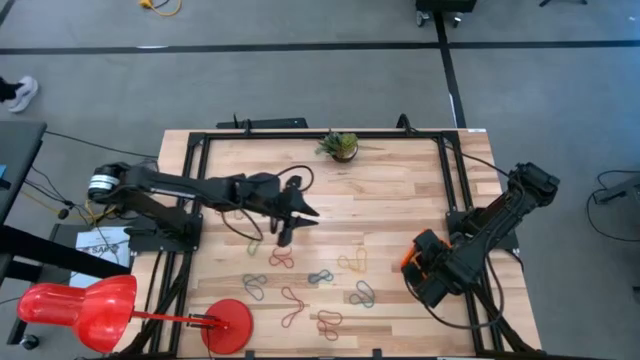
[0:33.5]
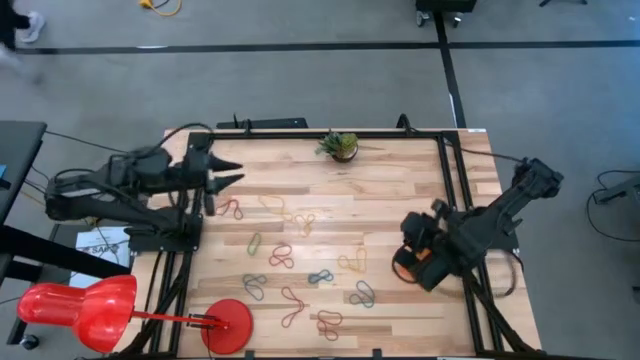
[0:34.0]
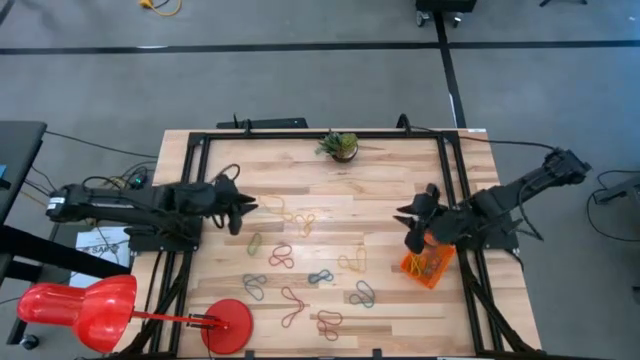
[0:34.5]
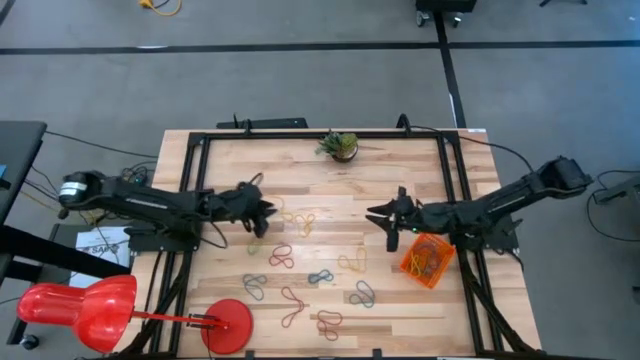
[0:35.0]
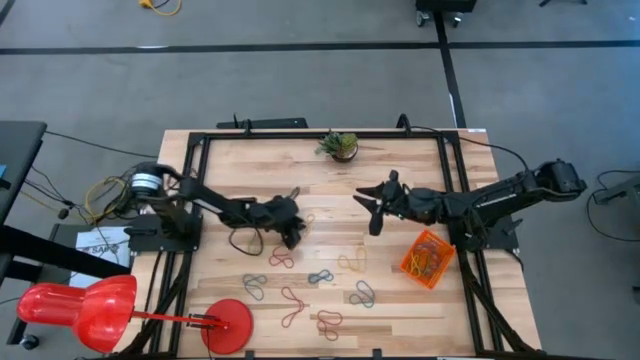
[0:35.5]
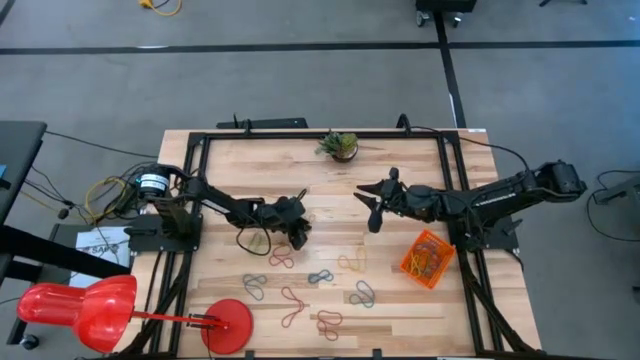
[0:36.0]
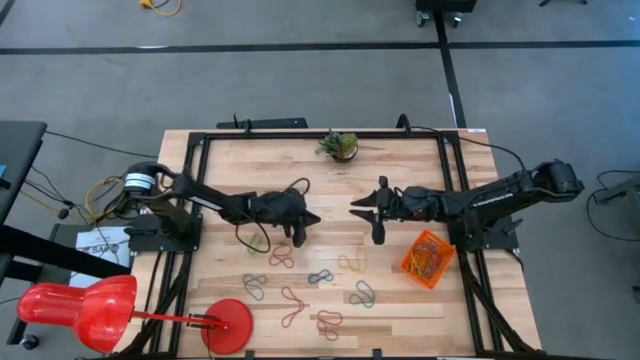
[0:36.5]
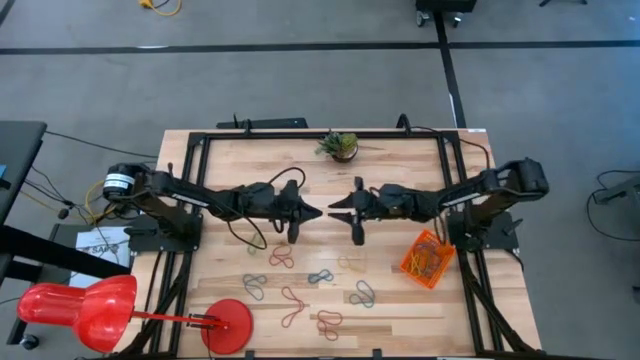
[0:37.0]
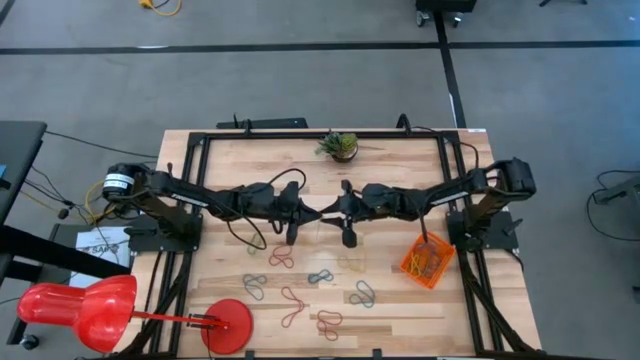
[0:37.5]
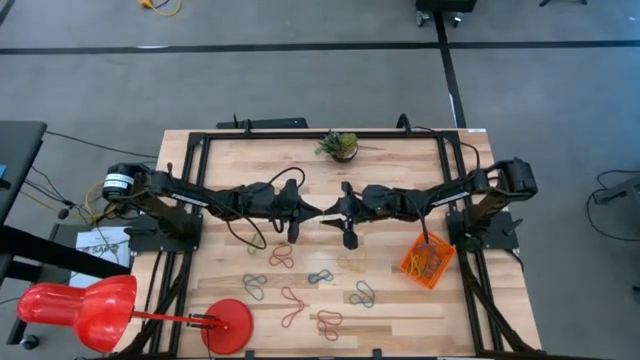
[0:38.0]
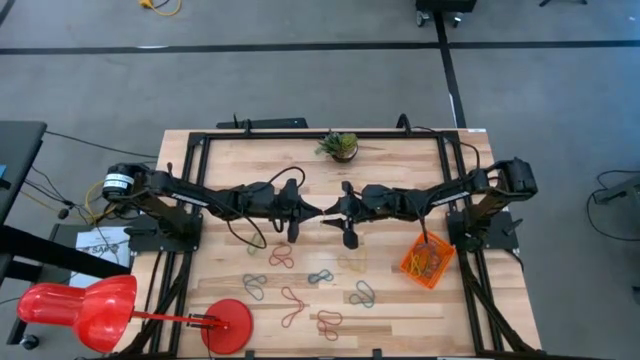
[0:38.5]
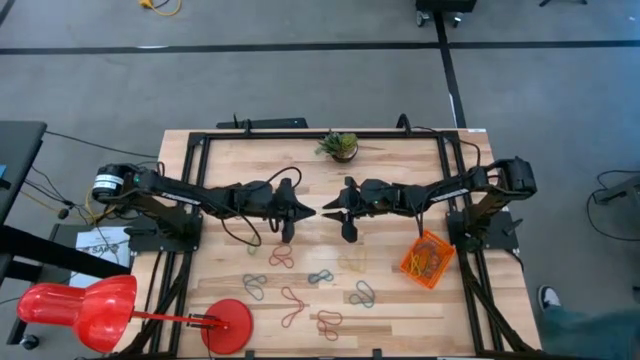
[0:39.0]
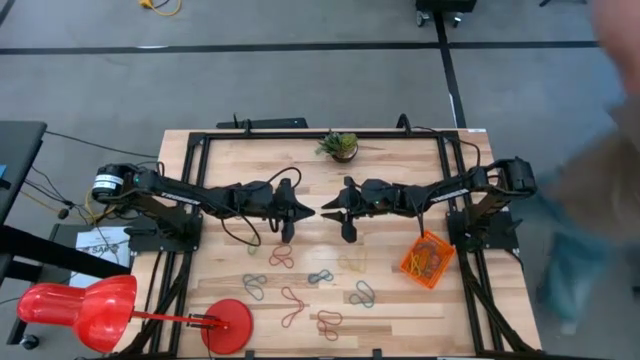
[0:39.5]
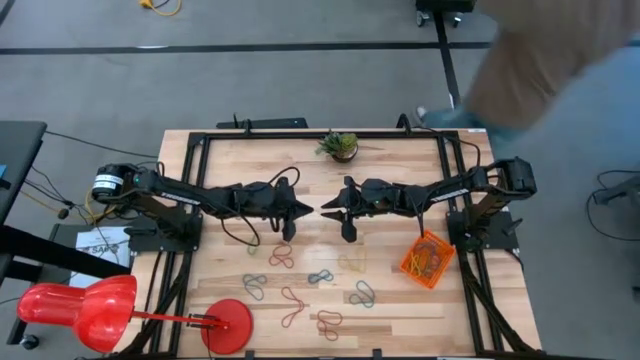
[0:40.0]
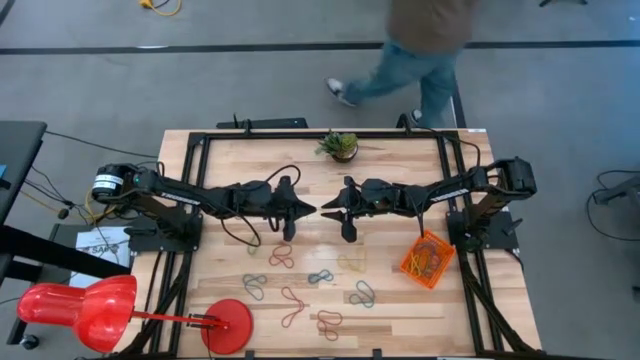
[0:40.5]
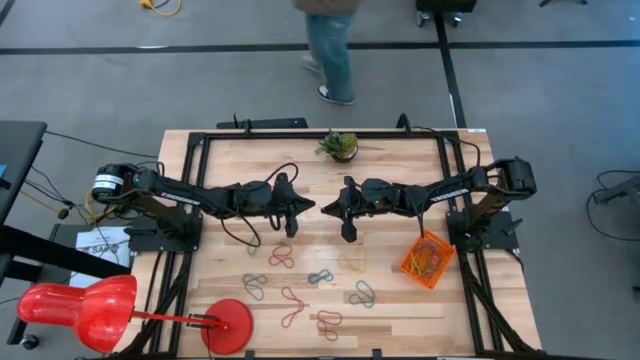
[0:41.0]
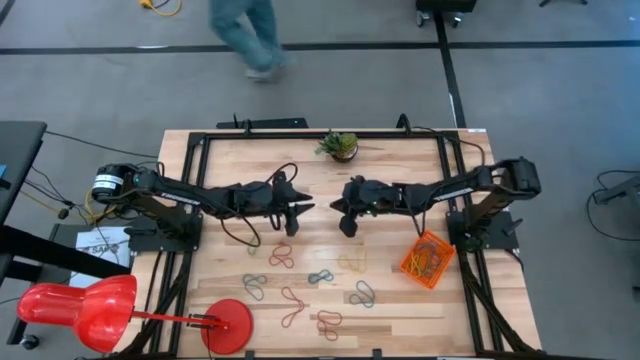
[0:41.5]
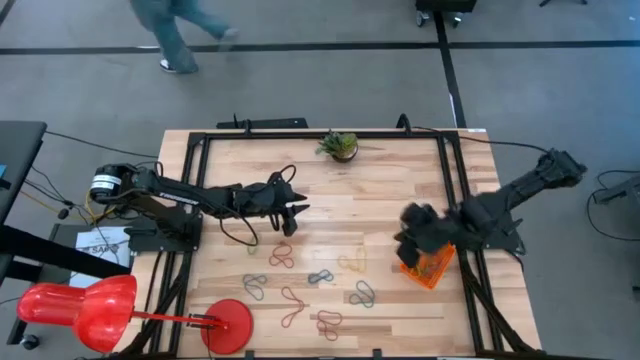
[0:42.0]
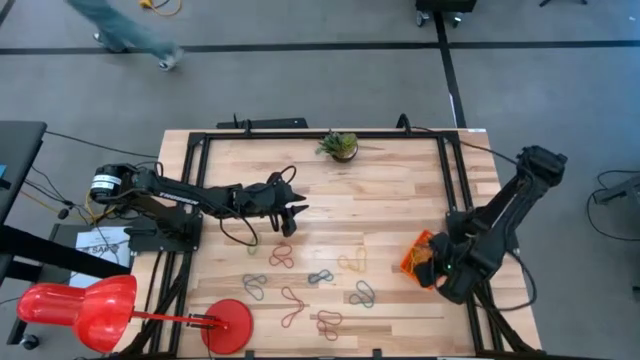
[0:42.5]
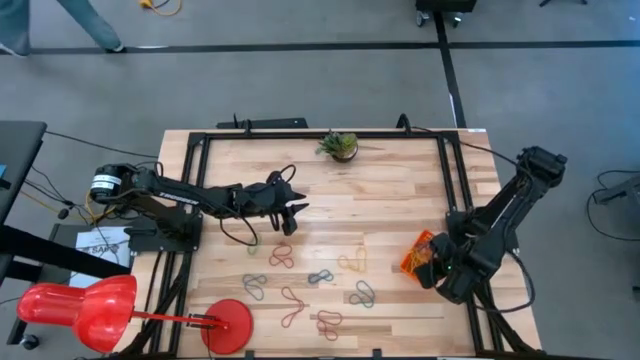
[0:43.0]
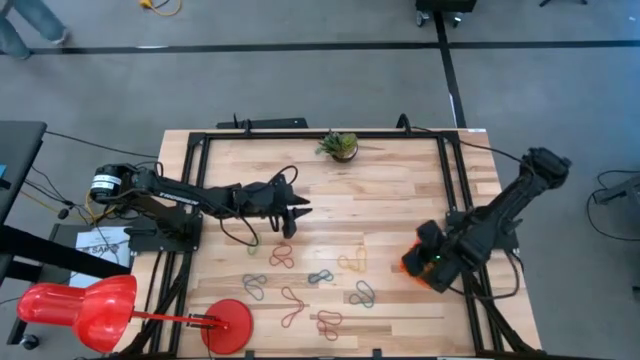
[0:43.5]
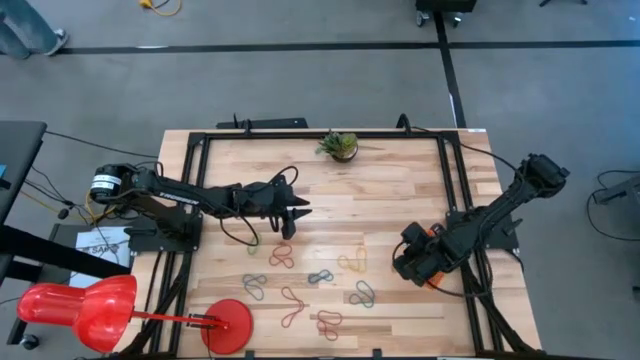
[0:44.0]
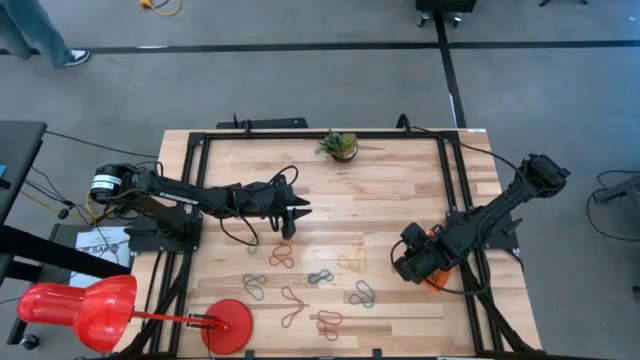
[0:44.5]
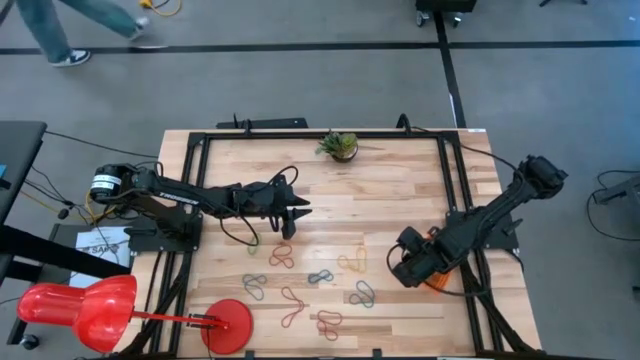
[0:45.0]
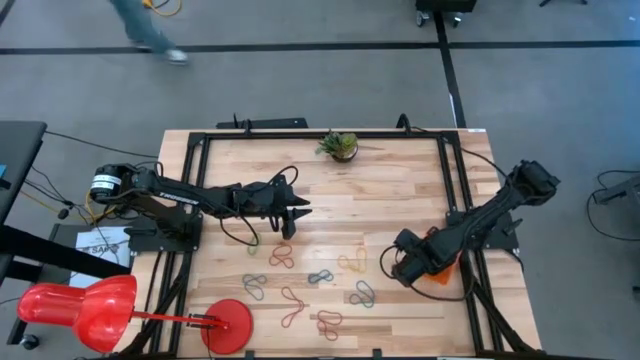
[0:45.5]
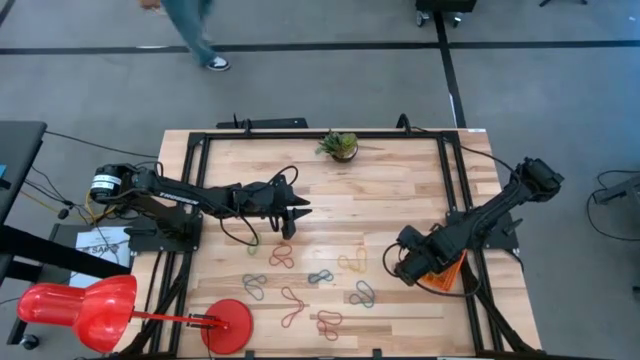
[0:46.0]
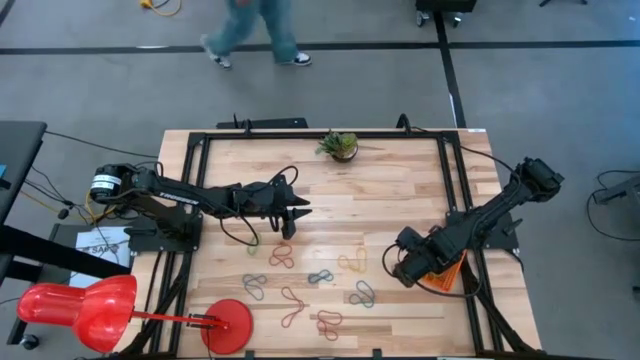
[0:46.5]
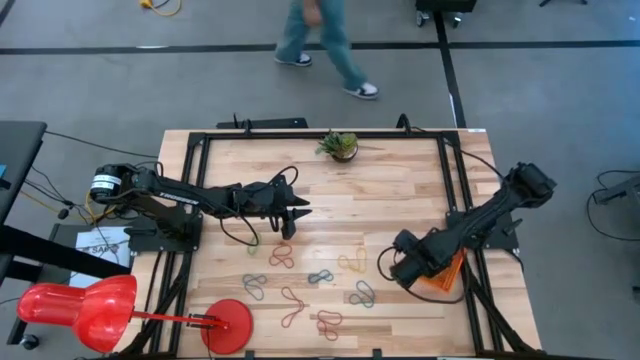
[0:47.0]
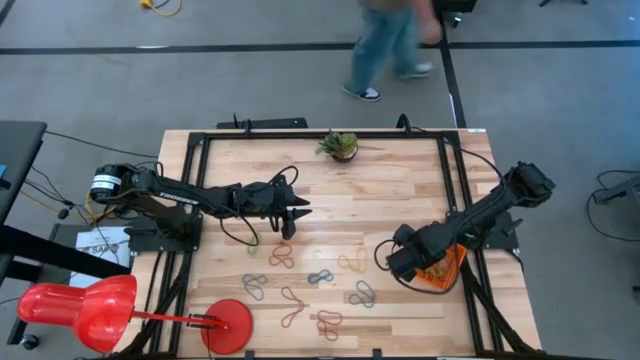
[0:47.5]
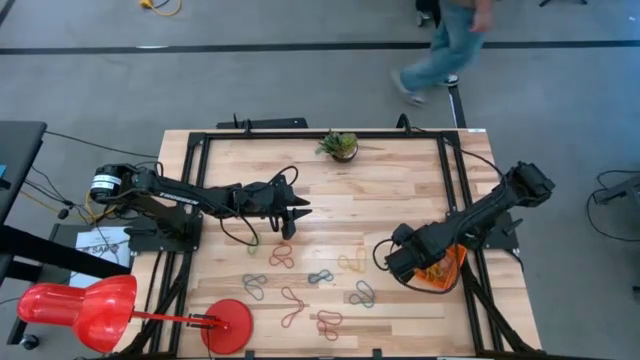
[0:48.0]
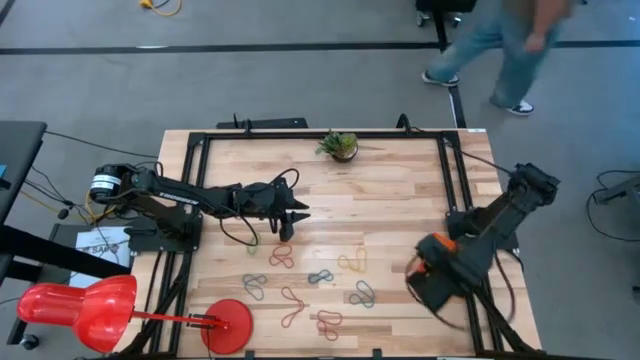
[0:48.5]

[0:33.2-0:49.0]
Task: Pick and place rubber bands into bin
Put the yellow rubber band into the orange basket

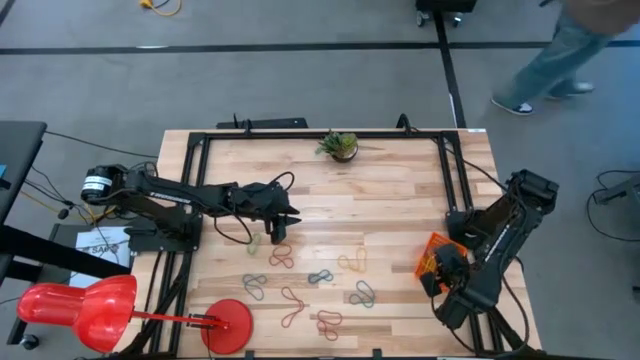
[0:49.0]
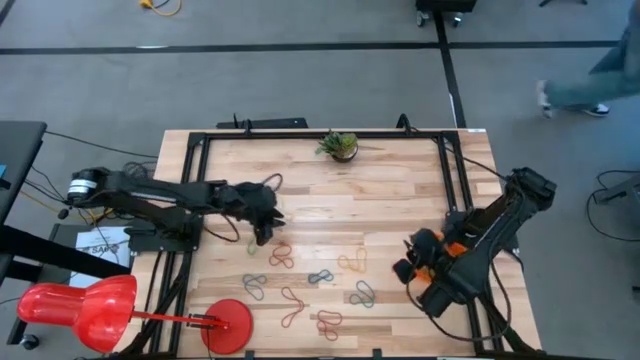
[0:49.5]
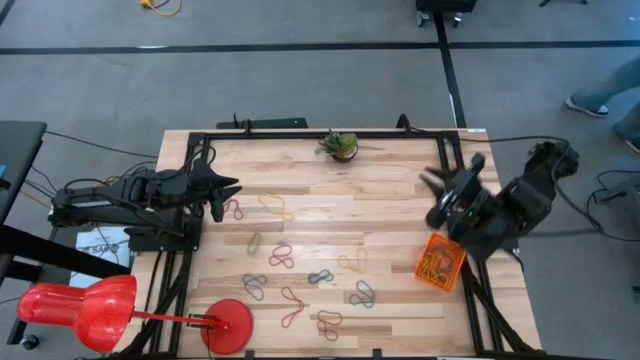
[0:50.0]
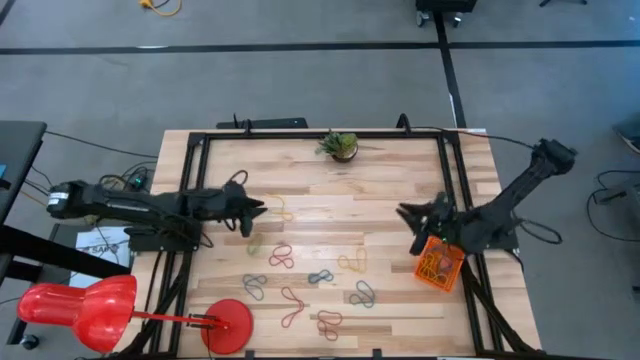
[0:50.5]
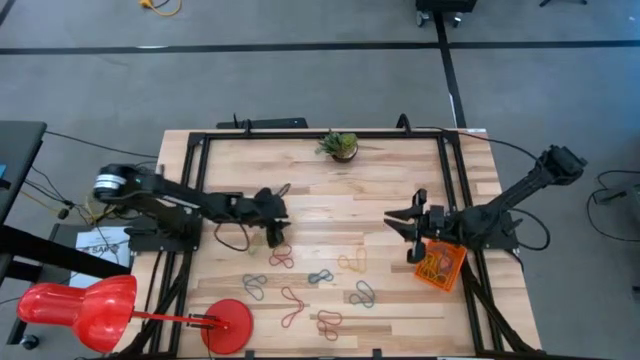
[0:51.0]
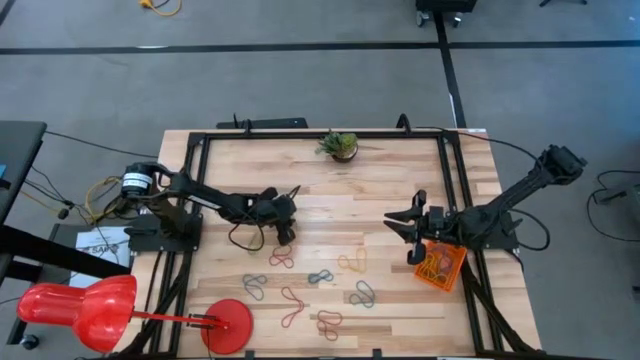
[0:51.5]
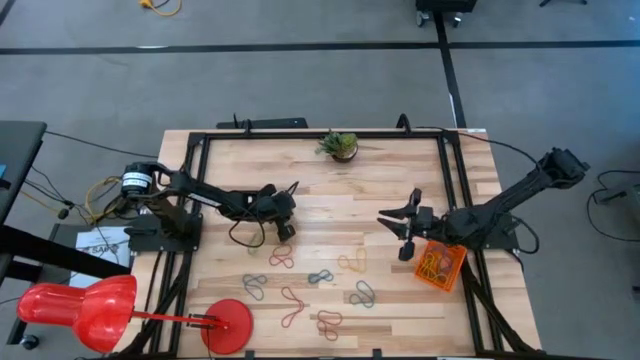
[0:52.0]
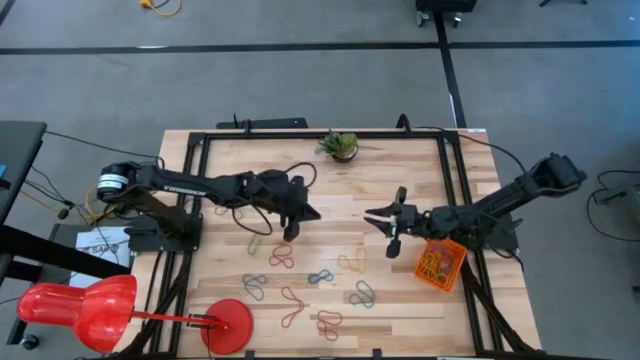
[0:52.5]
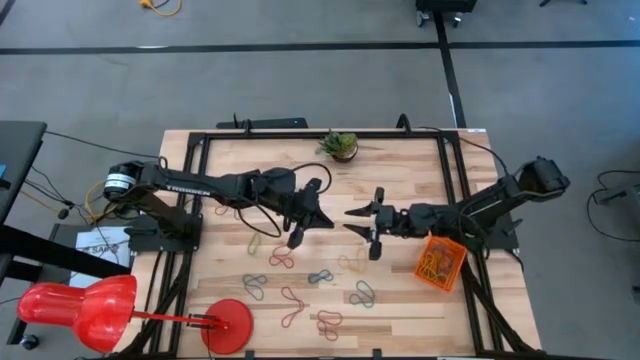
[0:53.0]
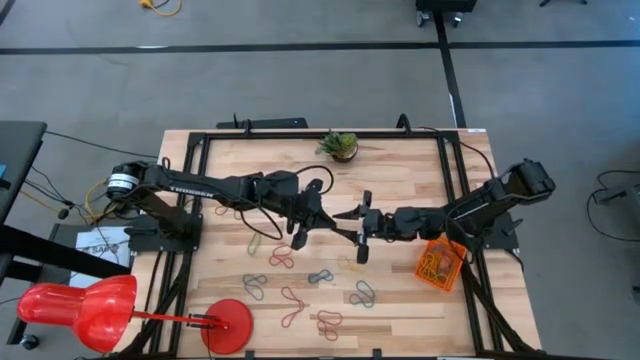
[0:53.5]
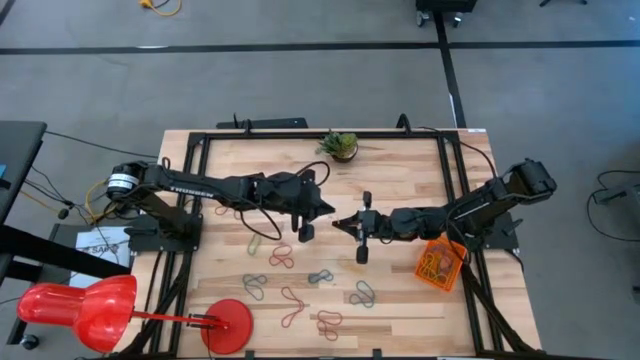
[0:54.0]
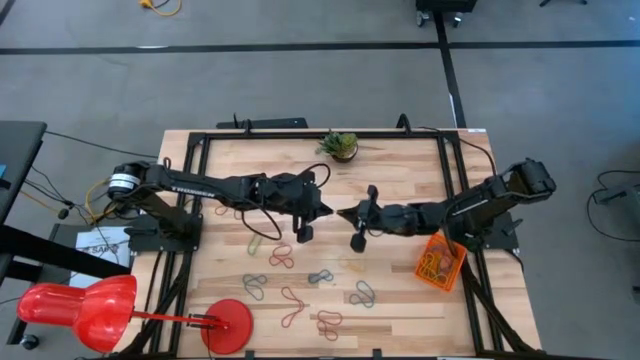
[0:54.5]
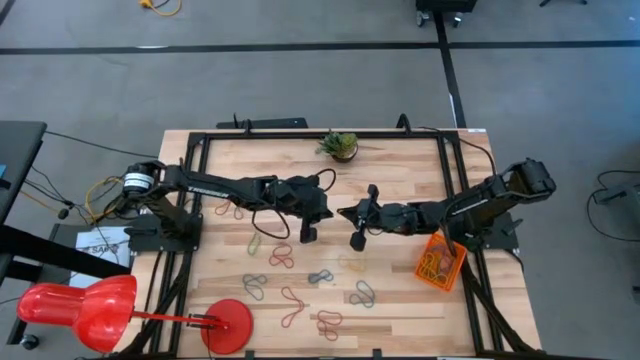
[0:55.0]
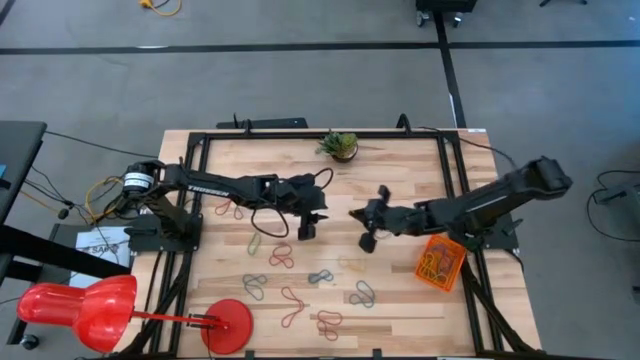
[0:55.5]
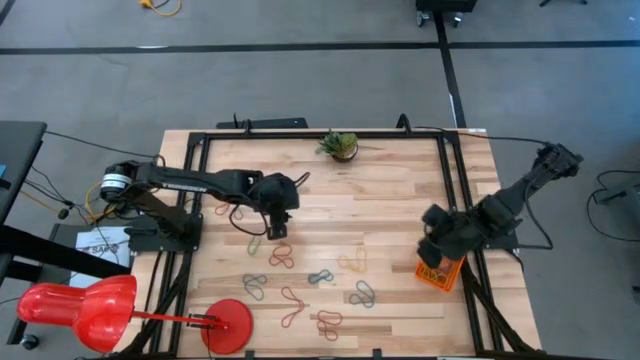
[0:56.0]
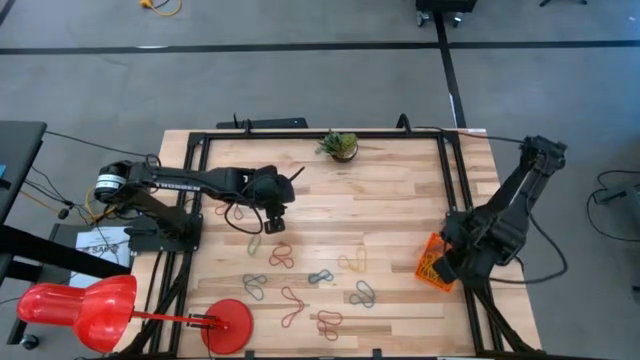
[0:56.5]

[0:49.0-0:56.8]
Put the yellow rubber band into the orange basket
